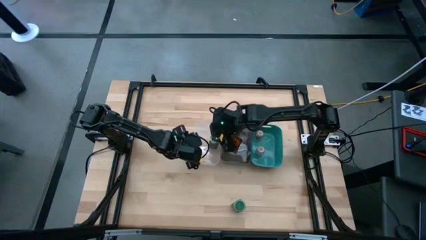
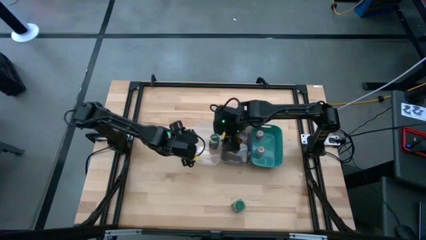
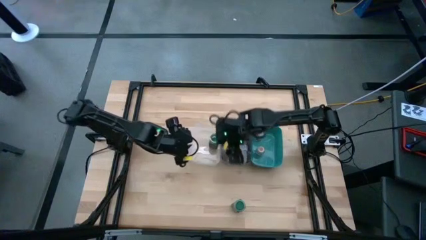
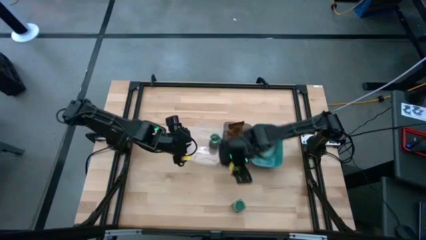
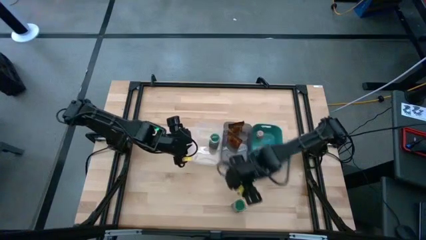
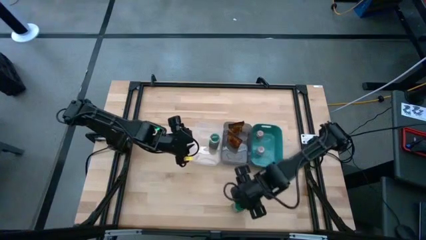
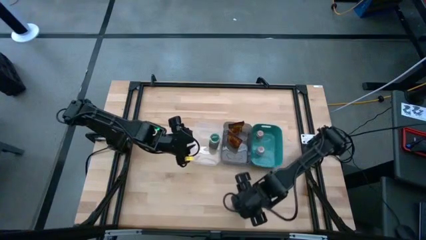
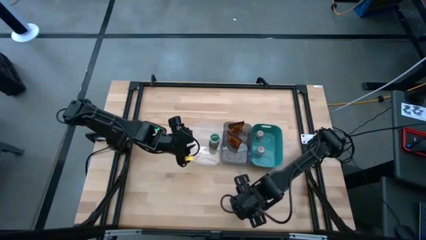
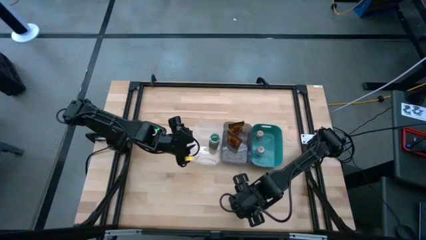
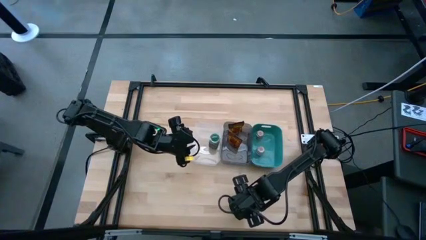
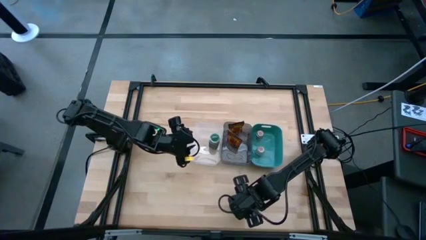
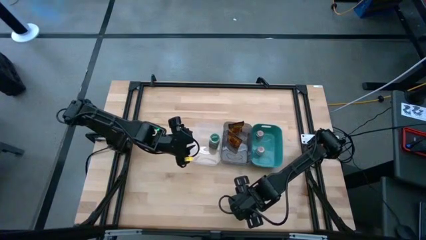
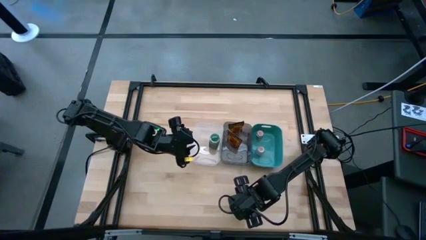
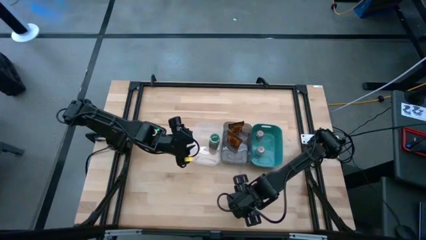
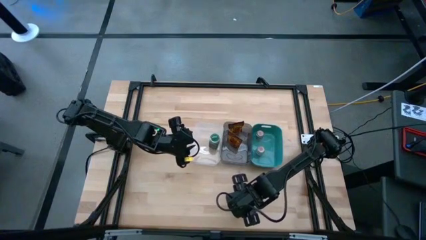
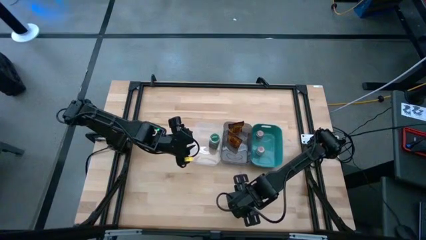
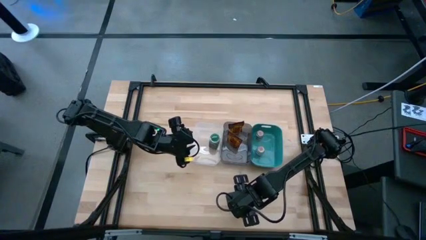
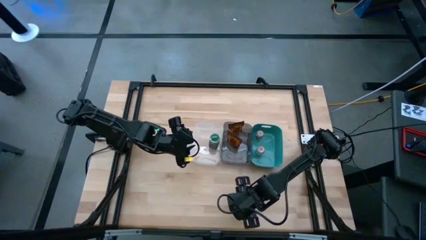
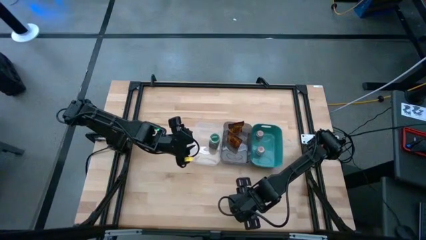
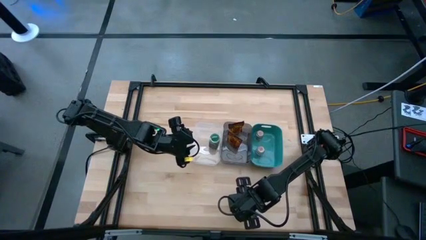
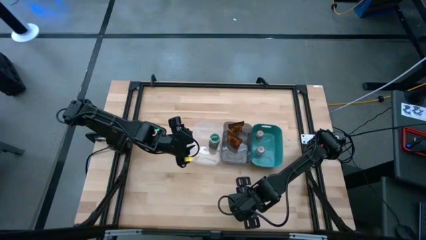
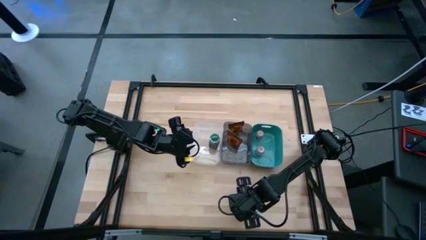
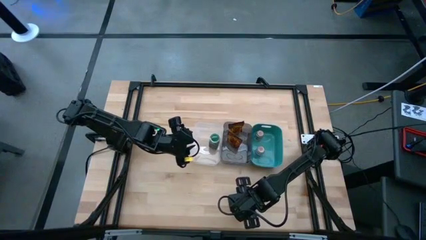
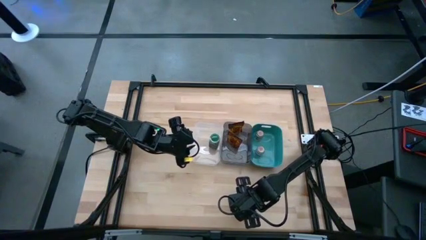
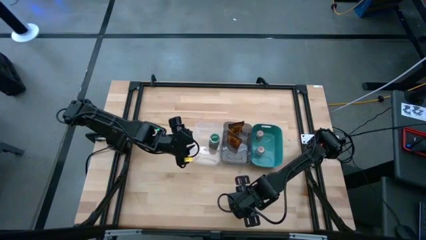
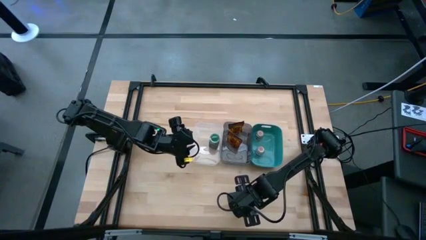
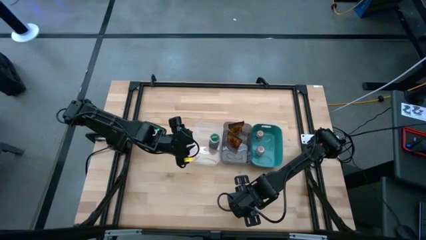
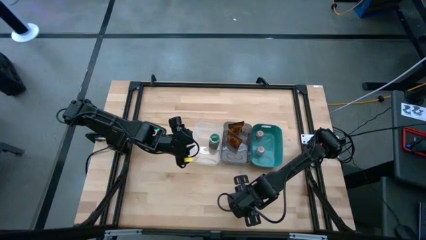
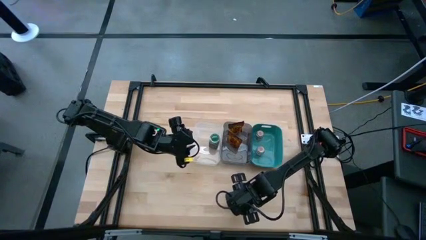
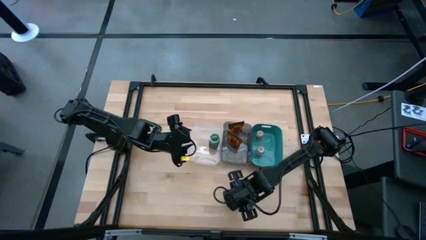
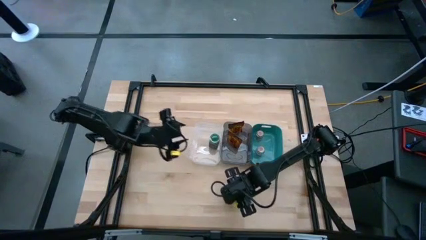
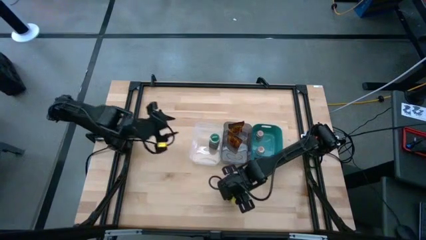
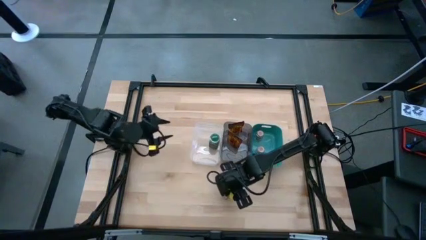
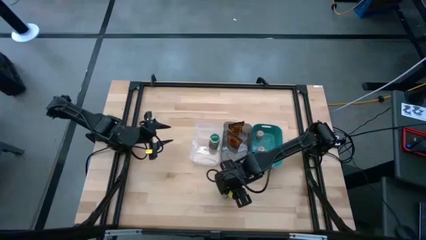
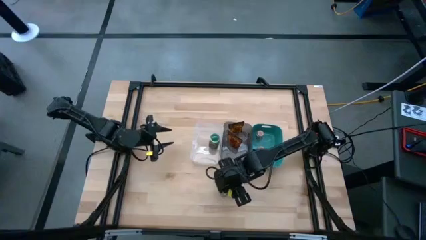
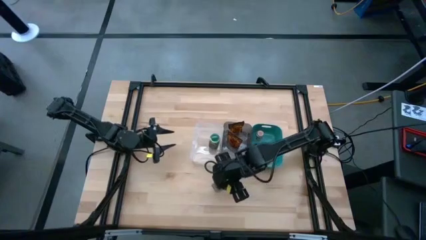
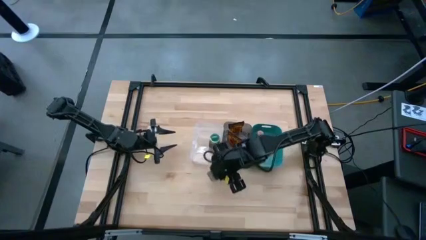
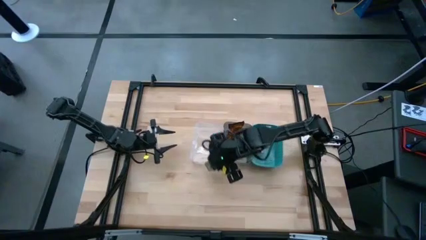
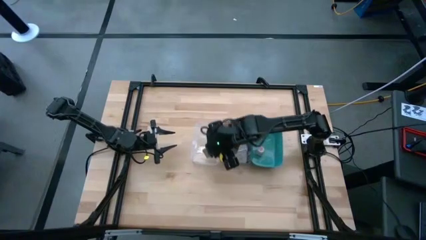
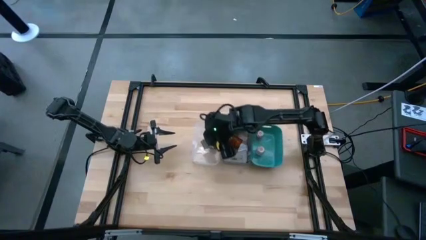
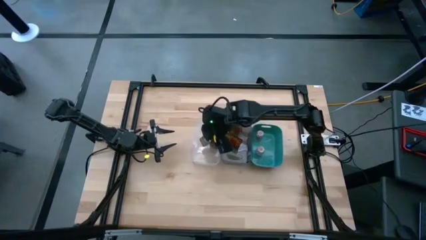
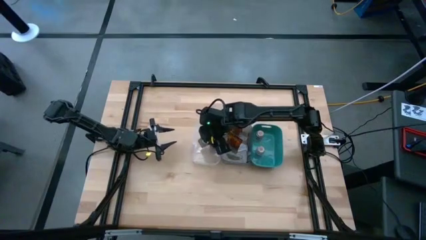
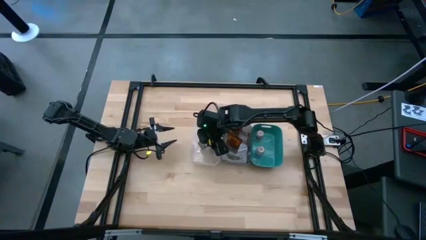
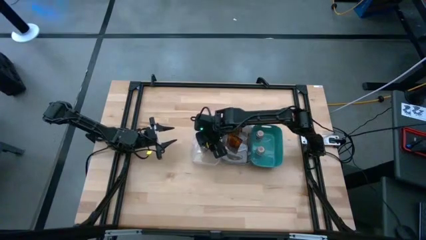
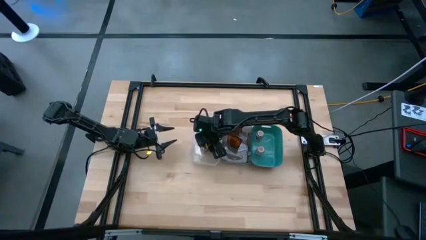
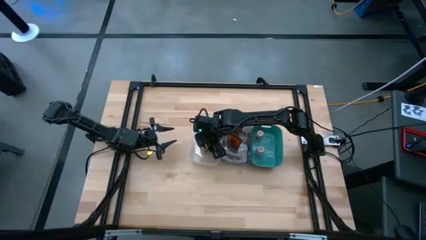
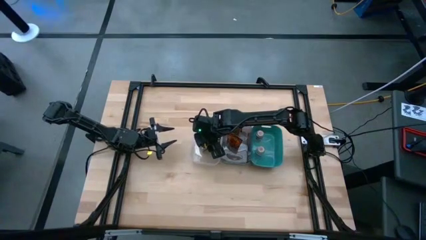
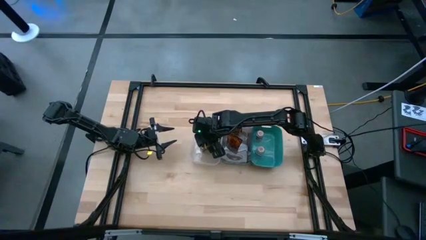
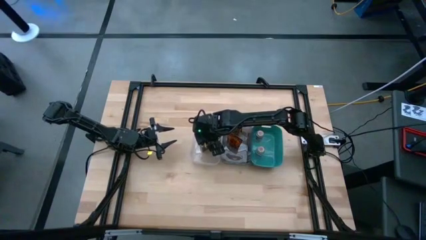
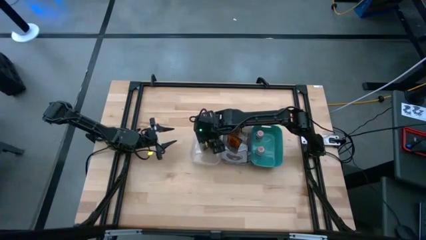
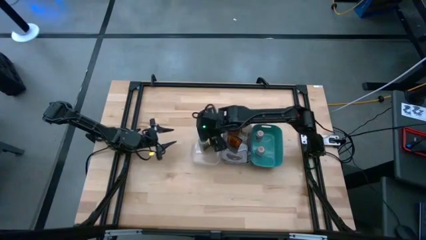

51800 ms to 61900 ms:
Task: Sort spices by type
Put the green seasoning bottle into the transparent bin

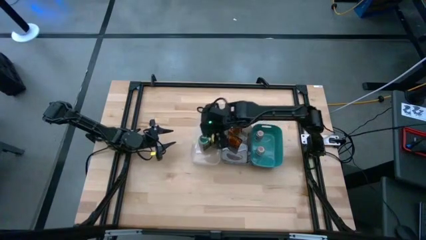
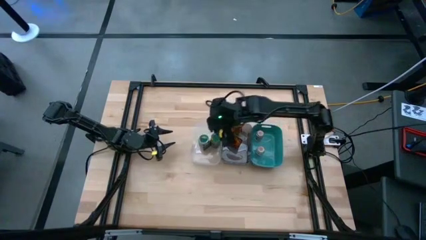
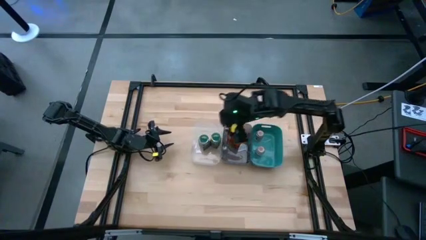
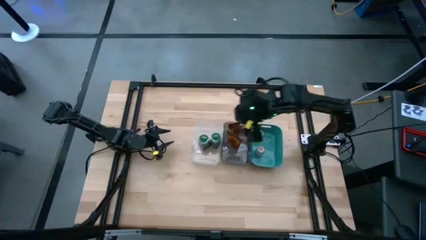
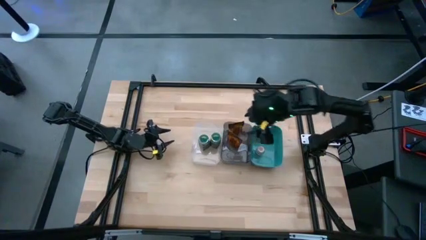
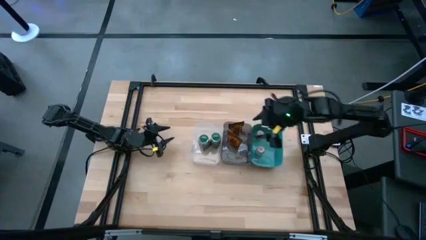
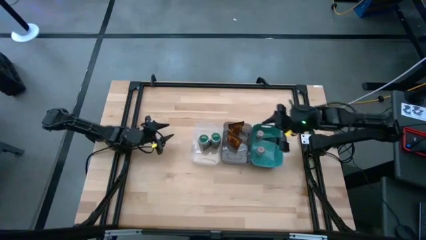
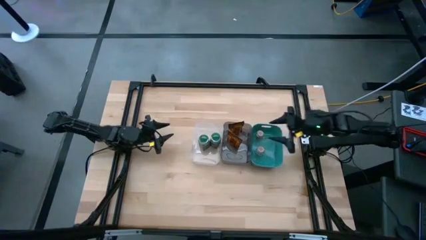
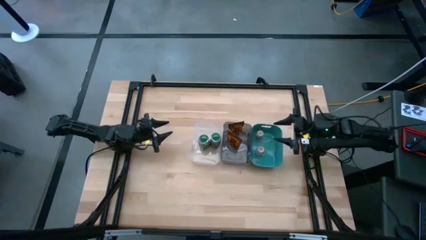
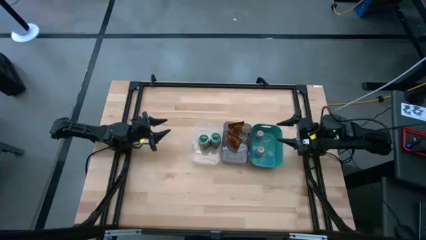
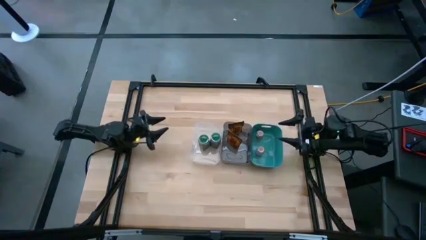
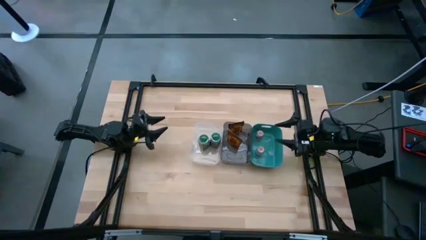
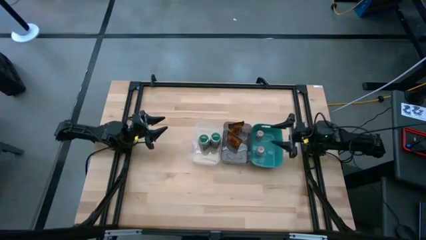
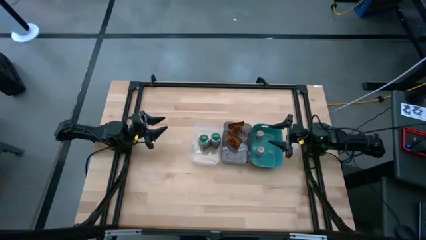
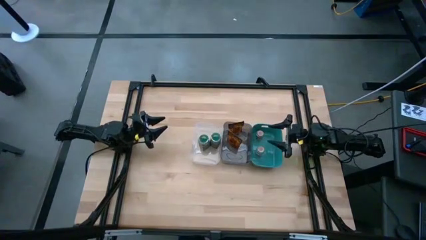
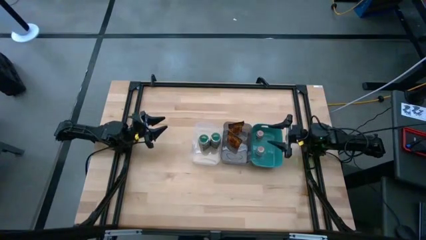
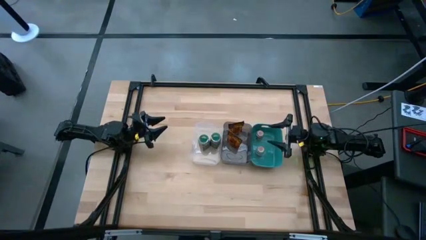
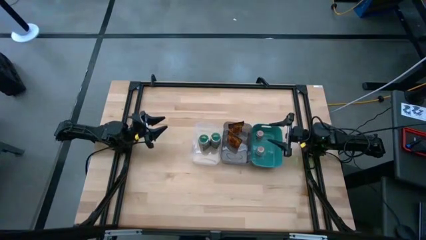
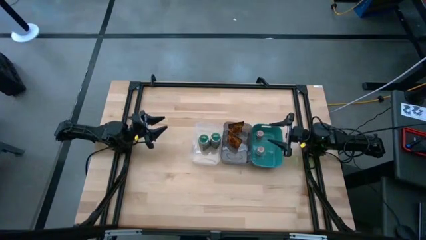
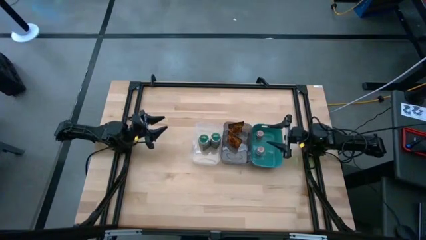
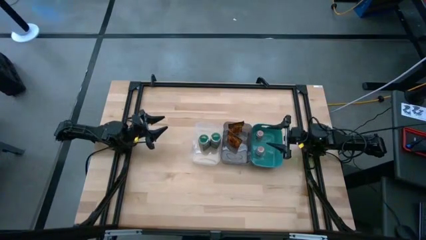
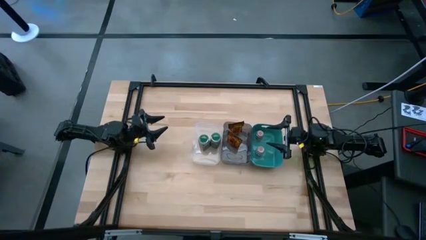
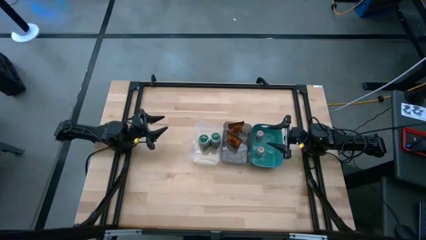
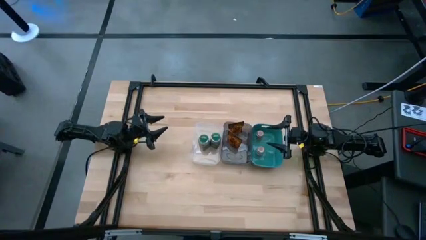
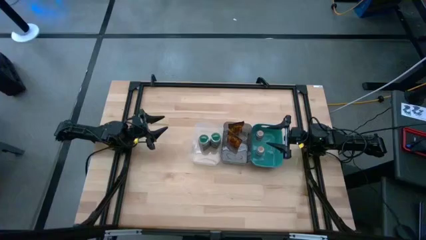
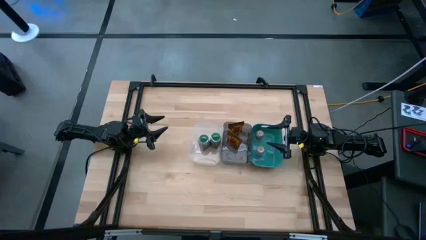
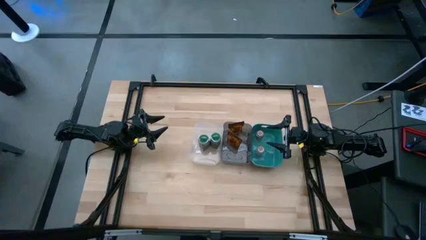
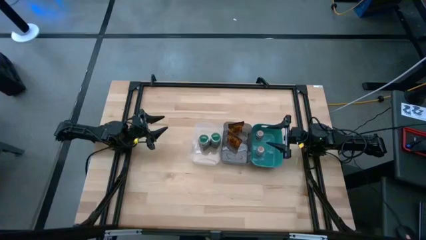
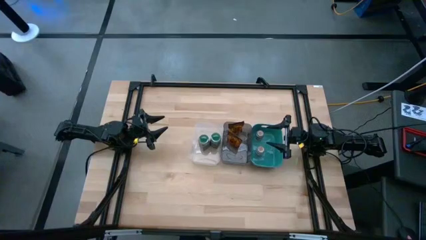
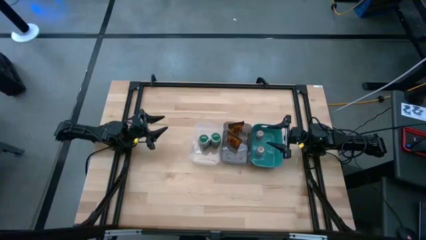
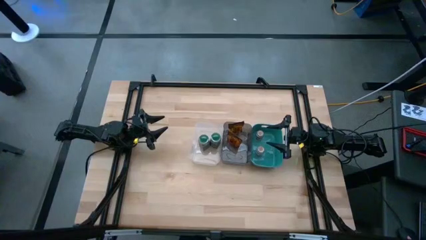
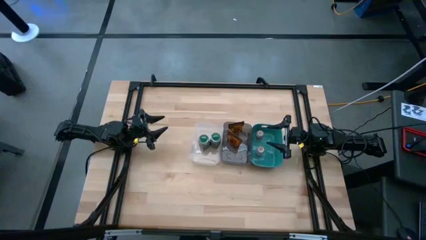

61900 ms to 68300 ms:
Return to Home Position
